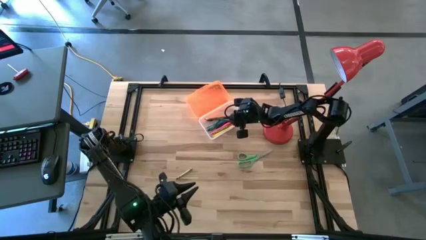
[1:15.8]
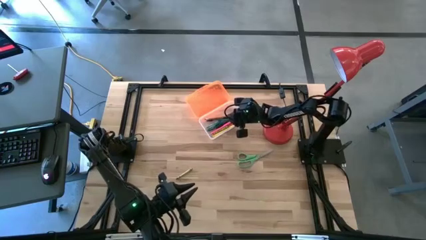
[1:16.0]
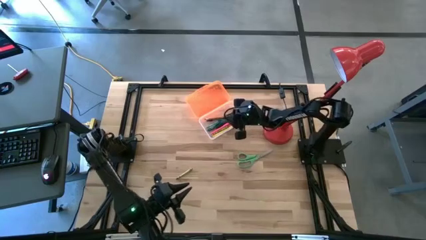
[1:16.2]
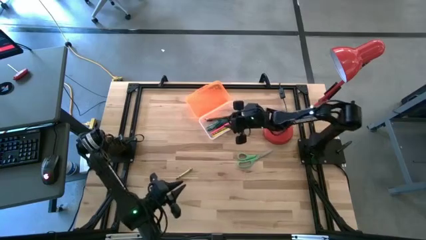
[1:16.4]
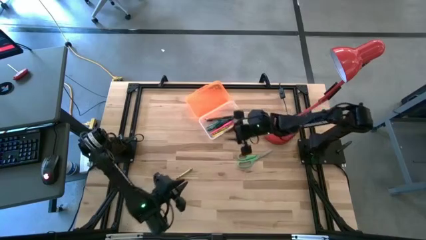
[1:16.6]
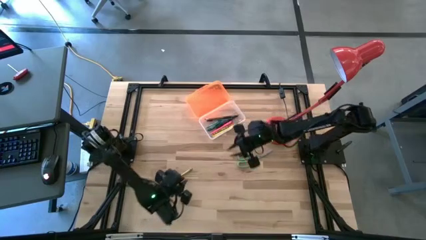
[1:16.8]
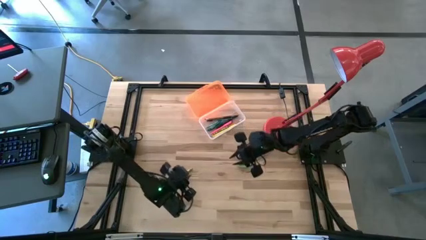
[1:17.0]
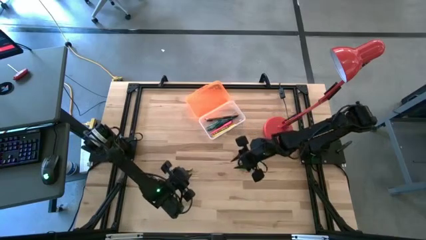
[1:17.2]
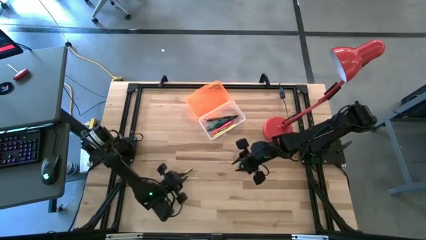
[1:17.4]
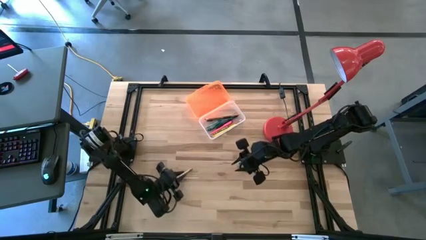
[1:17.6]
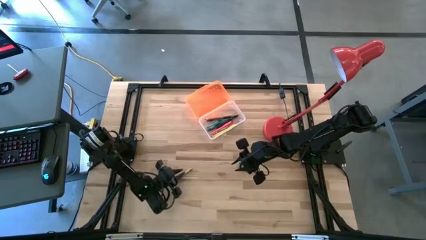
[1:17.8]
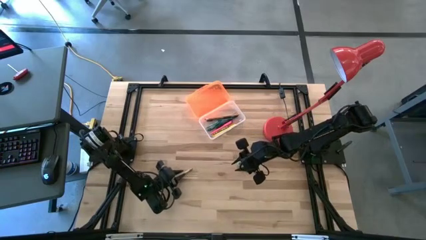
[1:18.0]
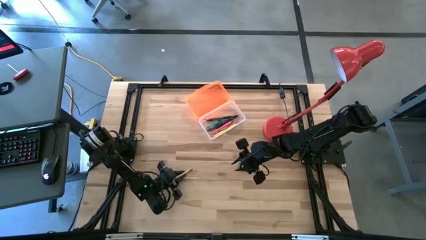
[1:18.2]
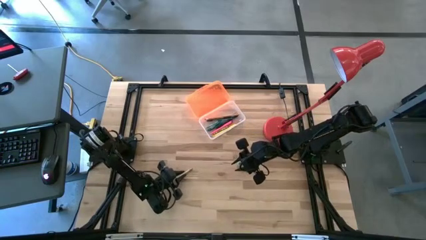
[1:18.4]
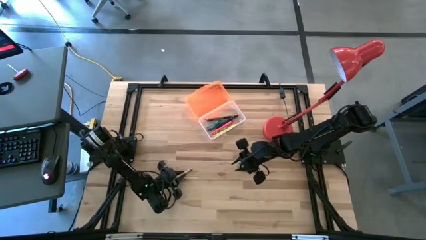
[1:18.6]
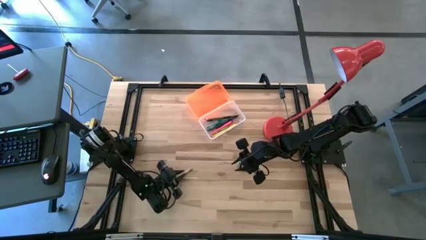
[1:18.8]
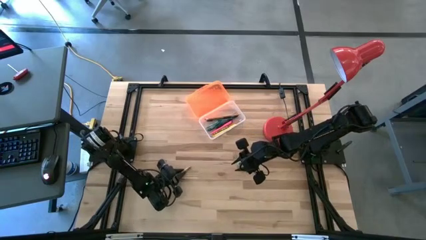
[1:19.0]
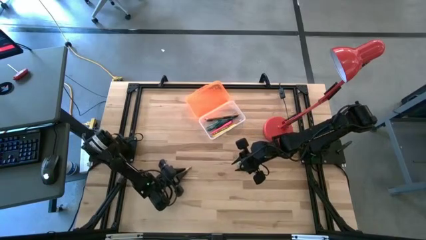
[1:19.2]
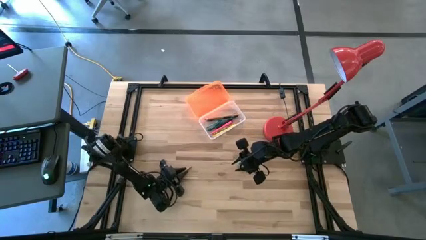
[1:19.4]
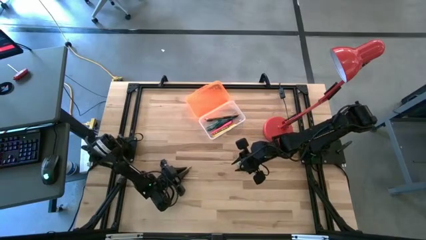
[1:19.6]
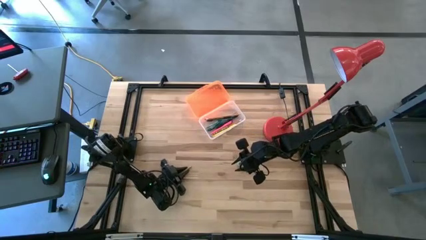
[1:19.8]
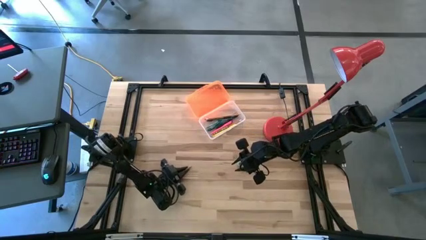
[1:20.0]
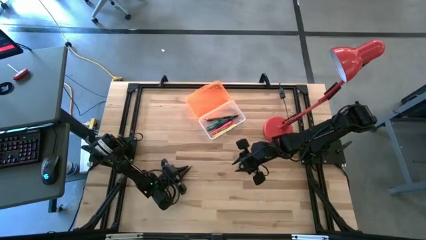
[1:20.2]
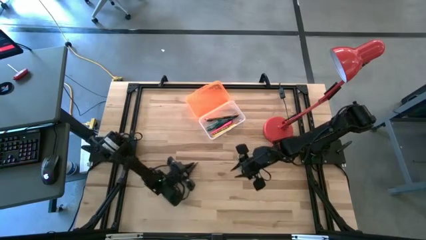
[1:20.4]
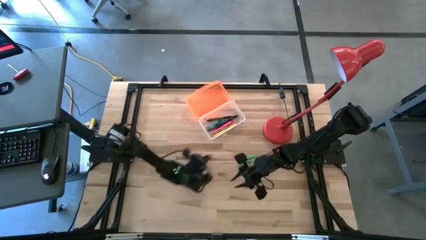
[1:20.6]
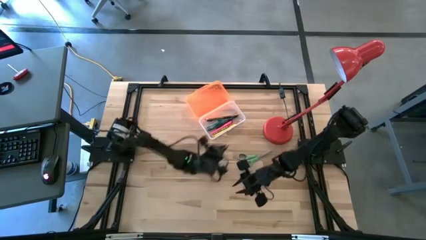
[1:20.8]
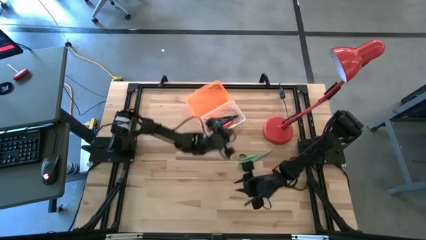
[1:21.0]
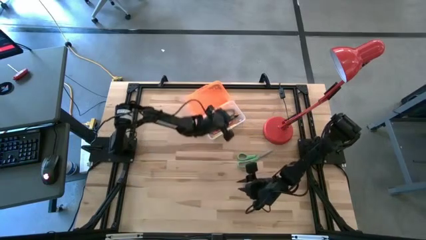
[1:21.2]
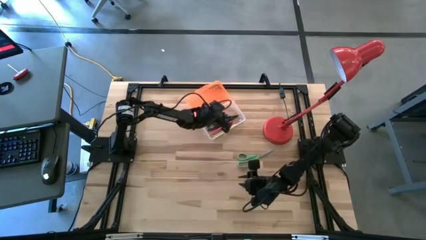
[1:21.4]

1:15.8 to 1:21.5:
Task: Pick & place school supplies into a supply box
Put the green crayon into the orange supply box

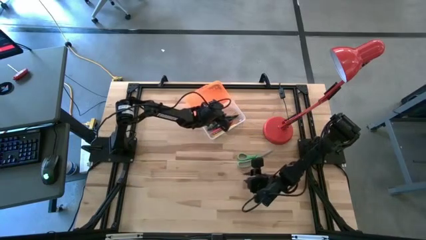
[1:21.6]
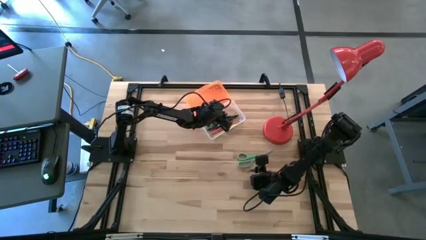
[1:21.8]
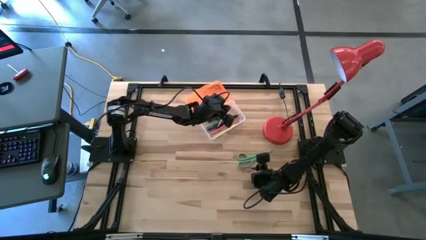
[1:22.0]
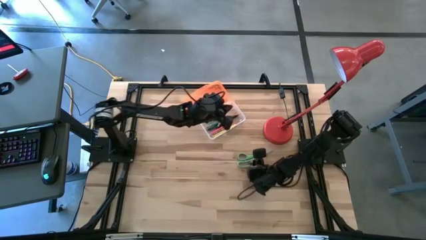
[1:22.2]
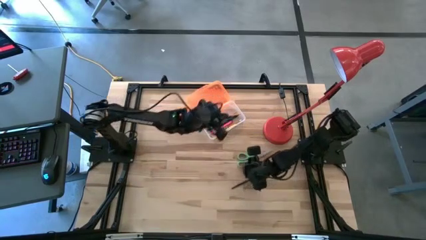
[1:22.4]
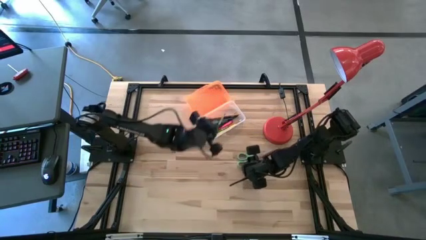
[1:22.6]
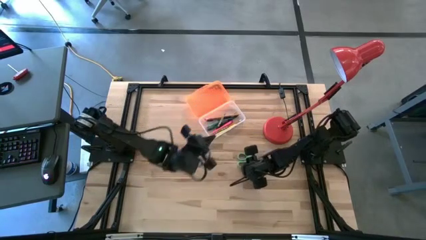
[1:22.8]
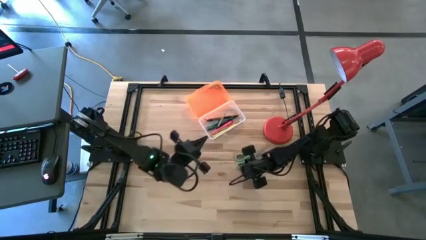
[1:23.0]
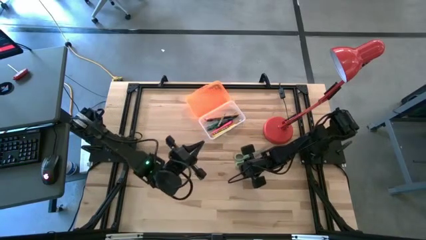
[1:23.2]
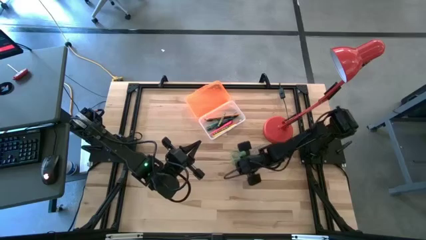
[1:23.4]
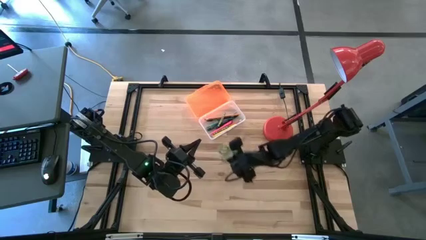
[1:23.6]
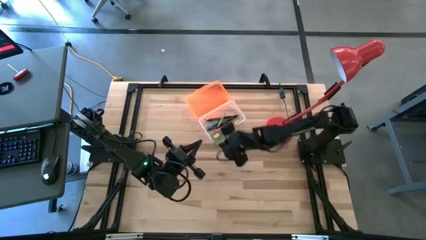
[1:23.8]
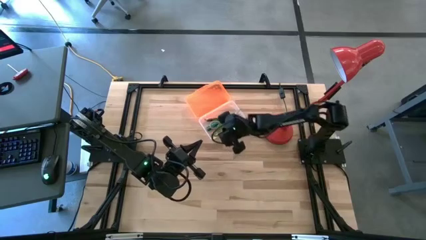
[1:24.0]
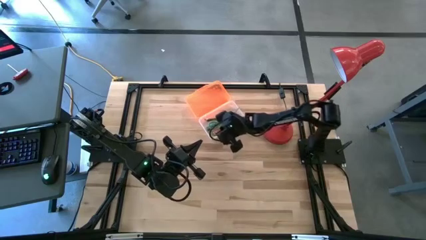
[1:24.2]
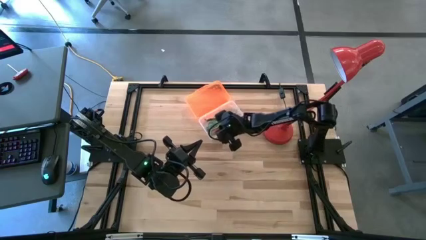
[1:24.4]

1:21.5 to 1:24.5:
Put the green scissors into the orange supply box

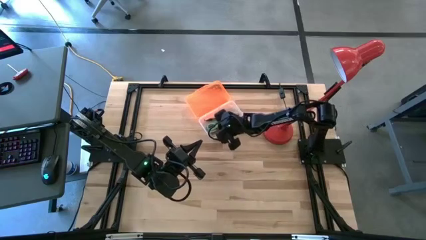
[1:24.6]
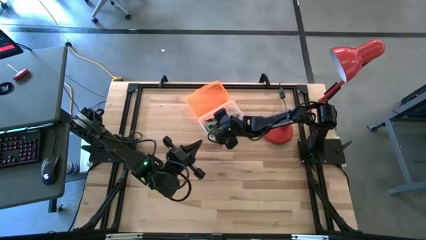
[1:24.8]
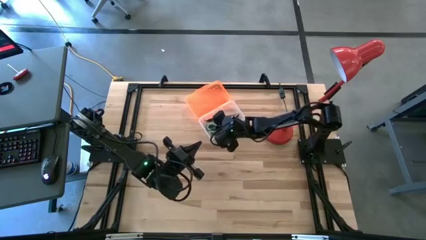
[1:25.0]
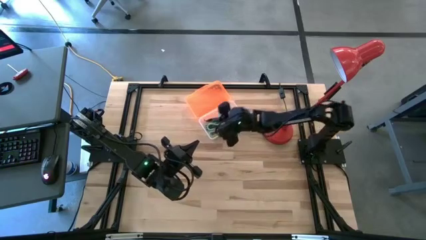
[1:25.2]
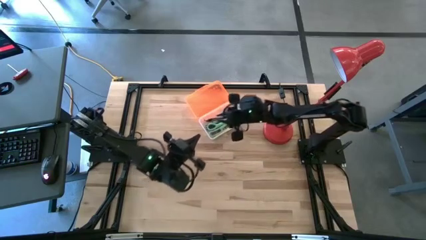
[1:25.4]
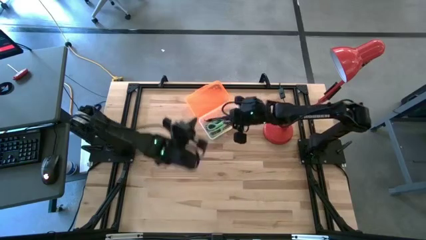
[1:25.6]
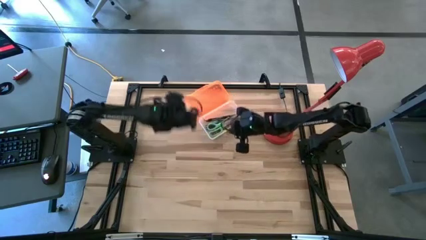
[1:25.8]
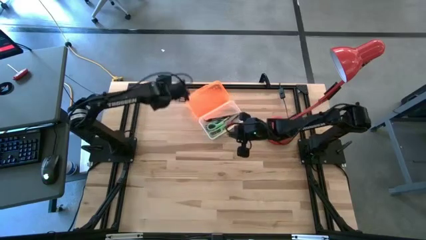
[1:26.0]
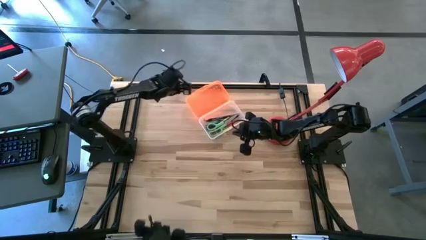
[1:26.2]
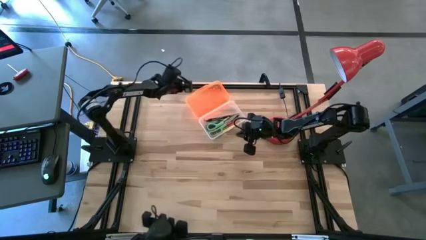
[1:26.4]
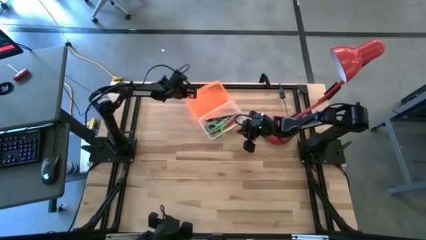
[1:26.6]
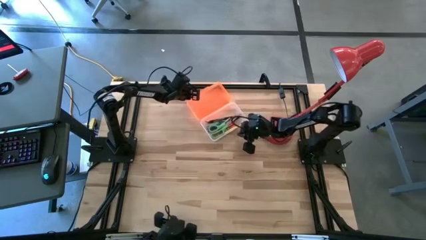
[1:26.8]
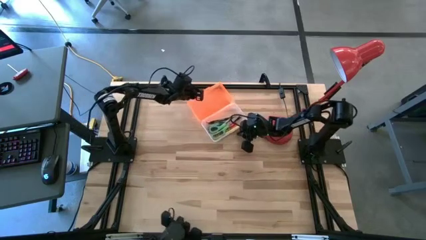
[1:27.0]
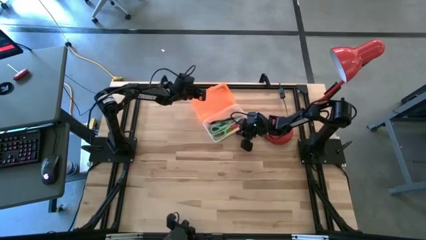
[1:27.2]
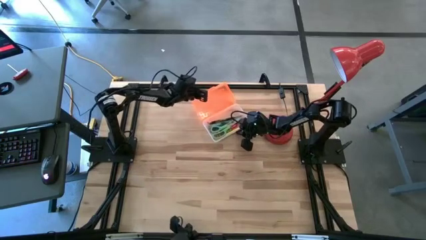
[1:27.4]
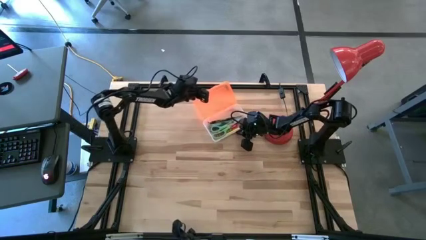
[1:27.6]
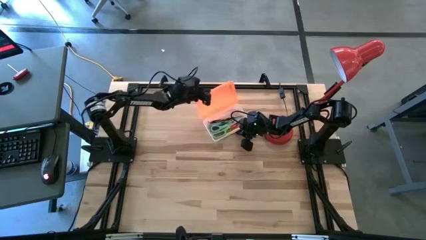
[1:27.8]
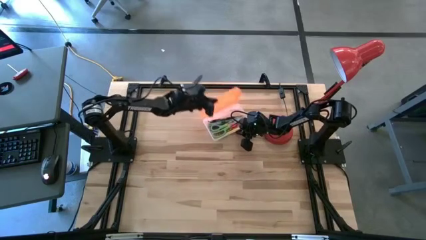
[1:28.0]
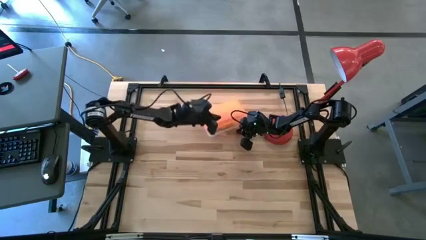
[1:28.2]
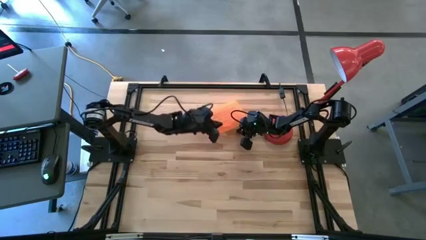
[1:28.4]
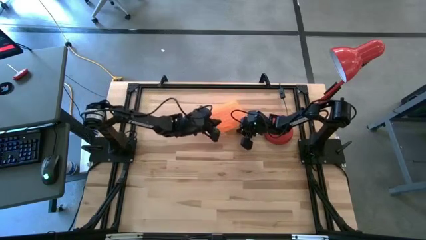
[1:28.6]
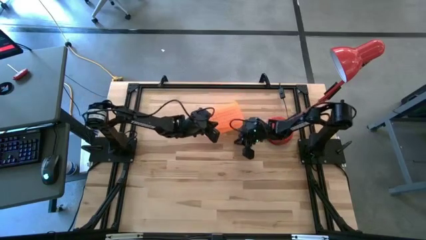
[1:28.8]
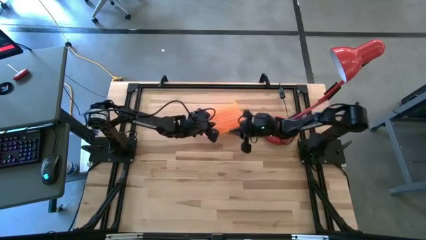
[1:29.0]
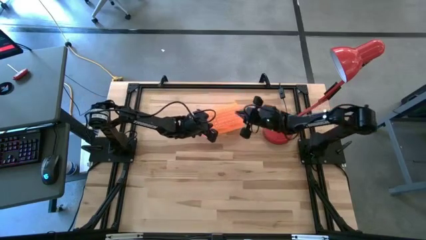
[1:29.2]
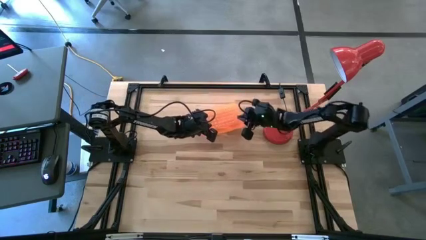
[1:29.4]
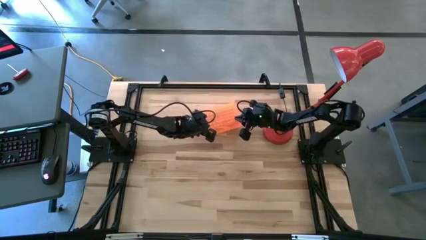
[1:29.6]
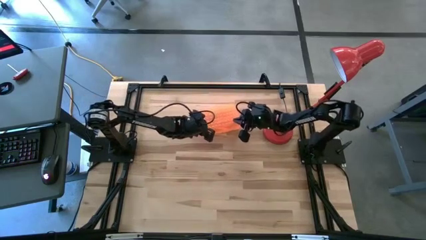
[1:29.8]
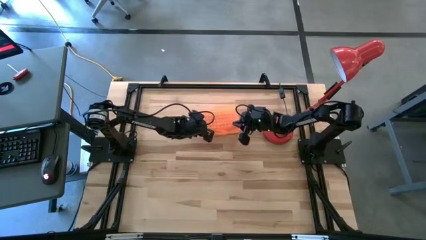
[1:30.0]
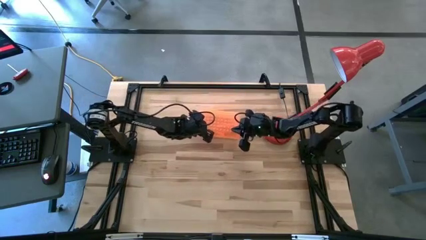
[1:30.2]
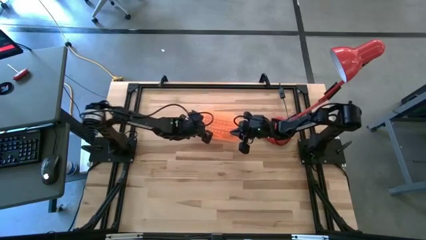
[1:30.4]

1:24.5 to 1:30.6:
Close the orange supply box

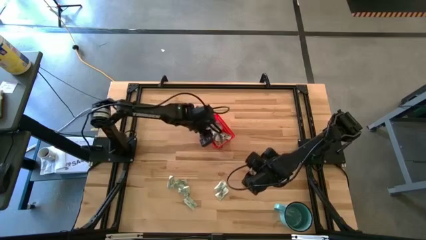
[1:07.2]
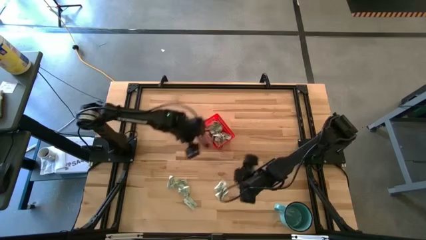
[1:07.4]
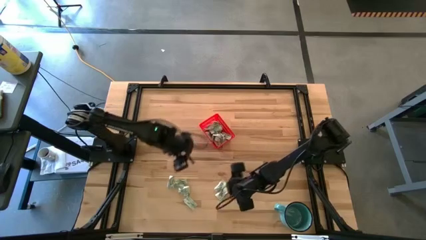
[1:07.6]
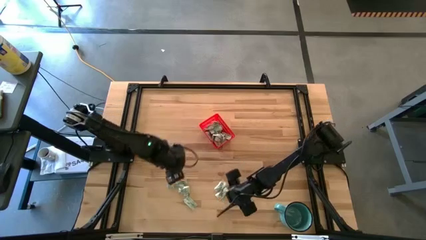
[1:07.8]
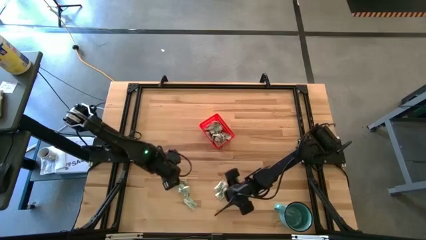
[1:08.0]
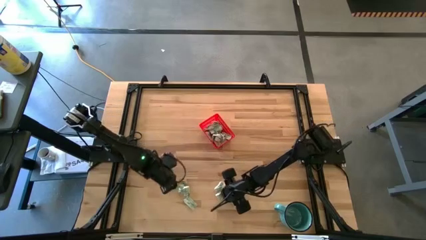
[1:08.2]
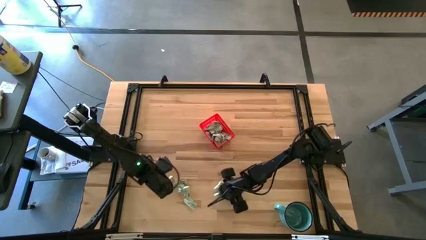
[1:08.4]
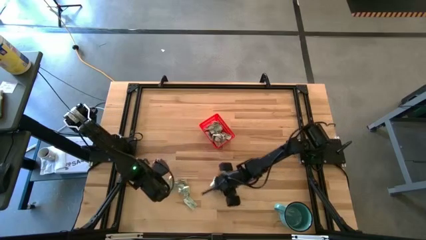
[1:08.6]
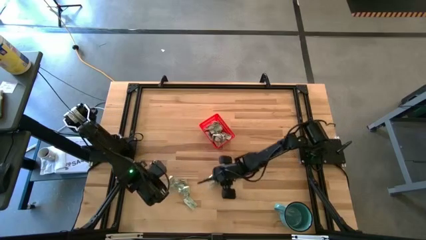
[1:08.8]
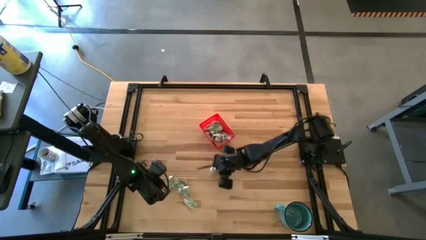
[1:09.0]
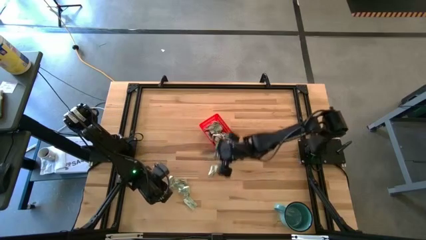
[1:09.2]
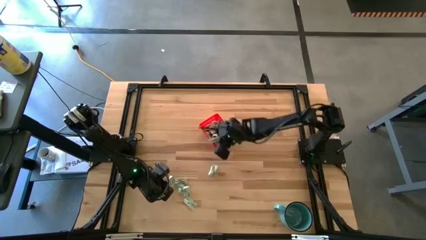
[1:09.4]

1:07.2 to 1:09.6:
Task: Pick and place Stevia / Truvia into bins
Put the stevia packet into the red basket

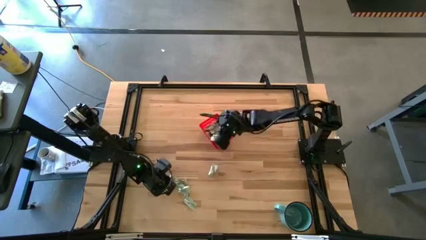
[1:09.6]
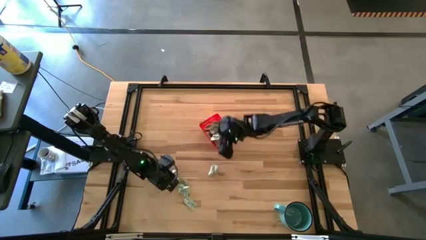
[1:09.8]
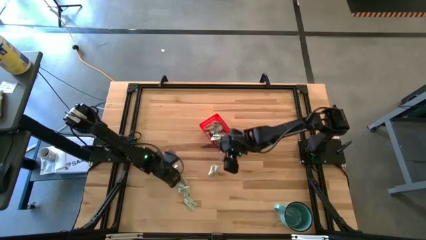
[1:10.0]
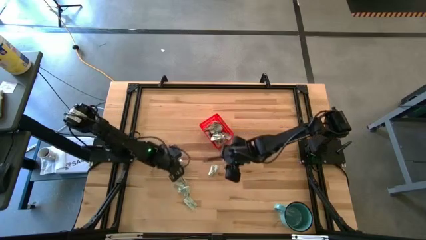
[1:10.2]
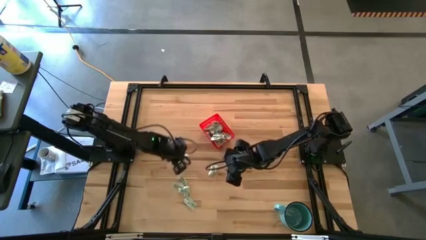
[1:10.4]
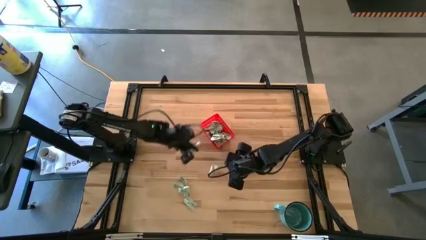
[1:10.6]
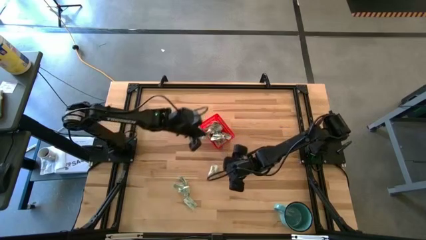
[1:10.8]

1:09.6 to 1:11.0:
Put the stevia packet into the red basket
